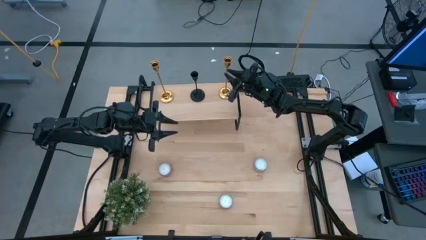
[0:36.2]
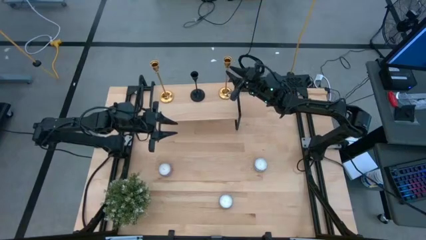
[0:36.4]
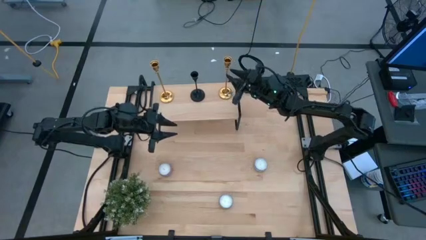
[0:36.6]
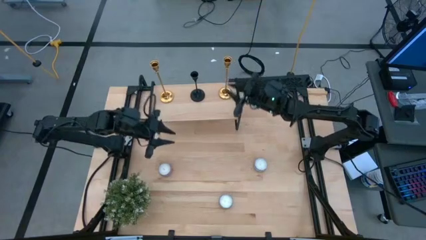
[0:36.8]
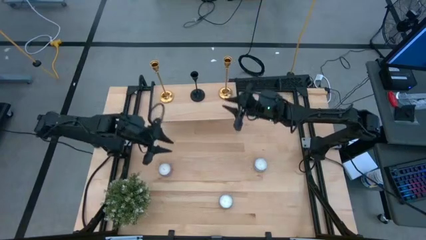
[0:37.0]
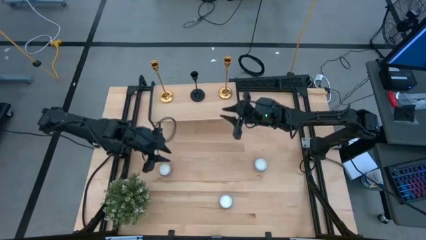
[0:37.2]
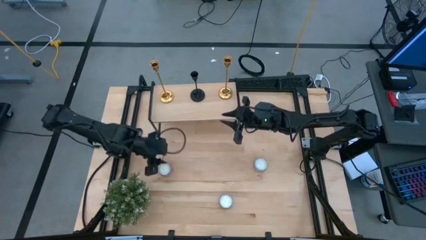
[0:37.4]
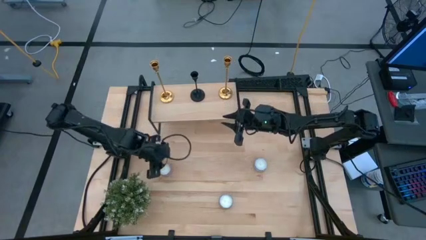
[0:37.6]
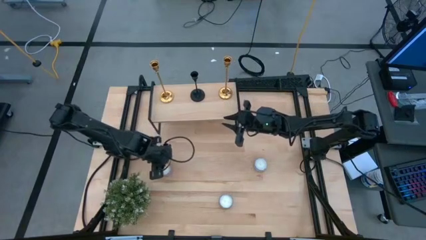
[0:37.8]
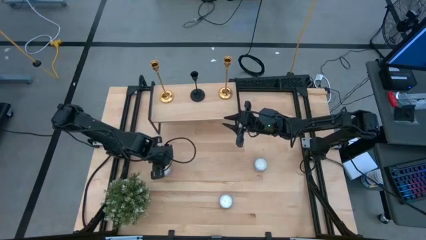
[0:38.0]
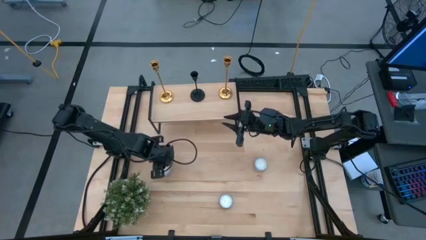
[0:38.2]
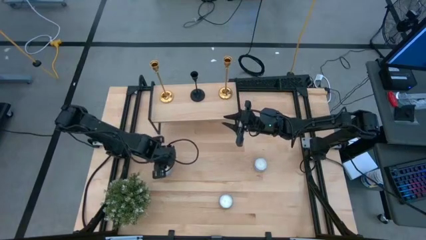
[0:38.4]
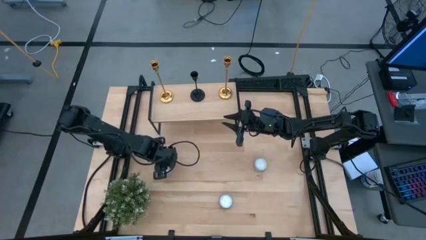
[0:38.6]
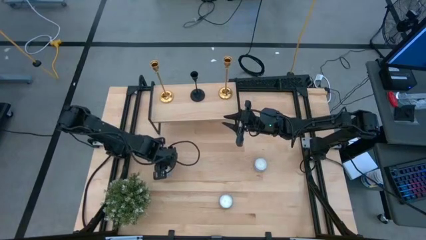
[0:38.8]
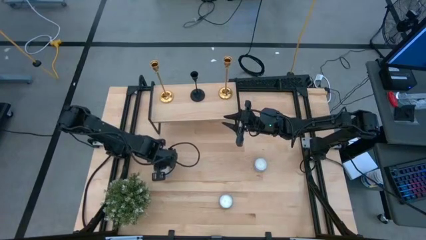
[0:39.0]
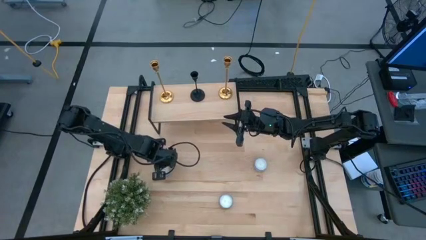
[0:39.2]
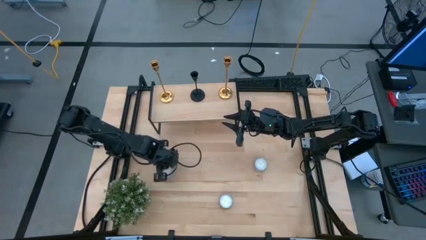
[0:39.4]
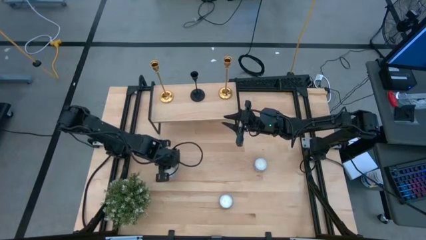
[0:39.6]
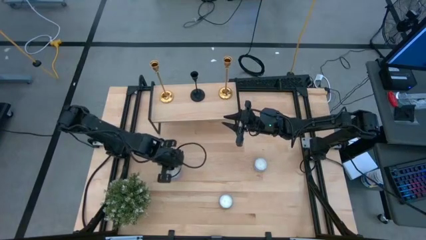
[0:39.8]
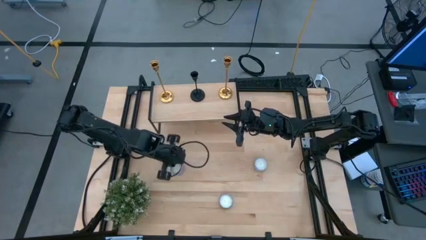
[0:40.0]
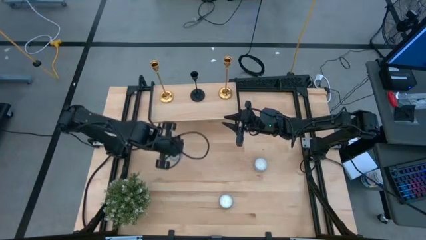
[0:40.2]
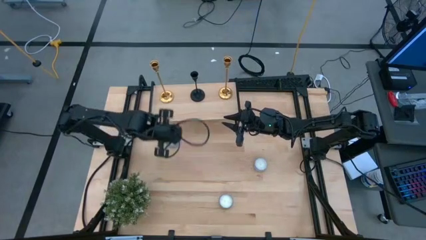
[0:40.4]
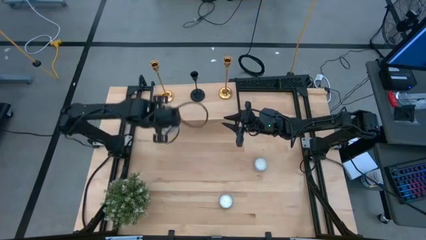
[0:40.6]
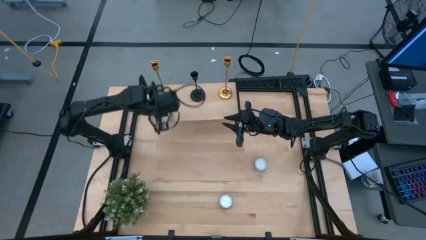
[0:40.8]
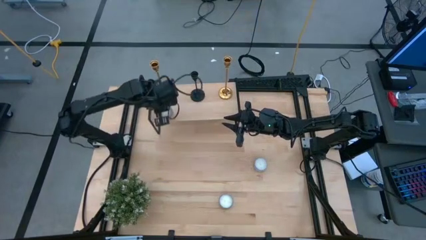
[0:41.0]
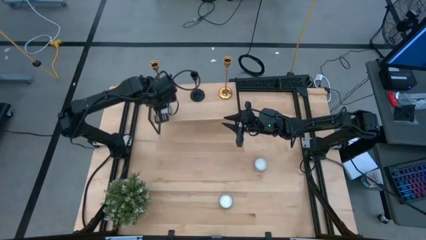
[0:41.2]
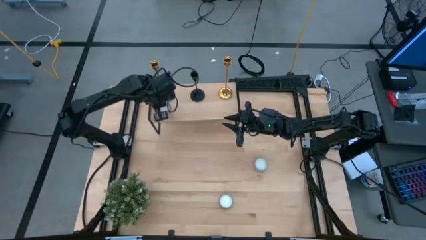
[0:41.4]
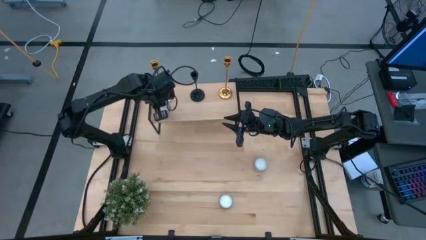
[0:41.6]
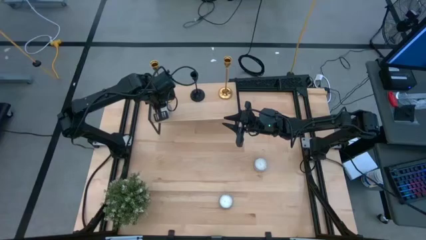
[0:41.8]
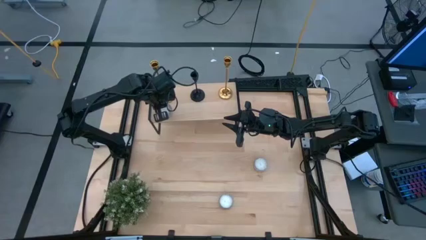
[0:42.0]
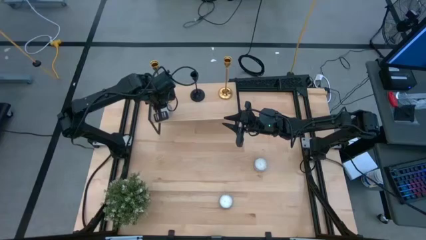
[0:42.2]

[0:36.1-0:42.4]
Task: Pick & Place candle stick holders
Put the purple candle on the shelf

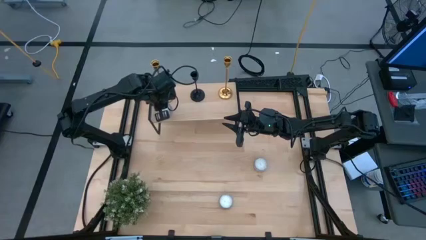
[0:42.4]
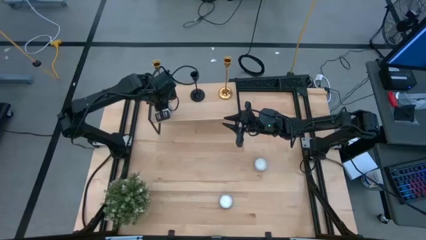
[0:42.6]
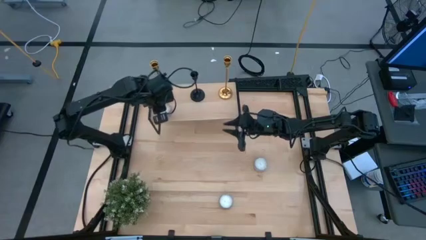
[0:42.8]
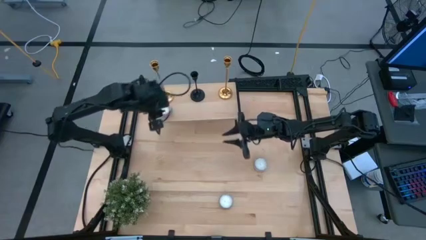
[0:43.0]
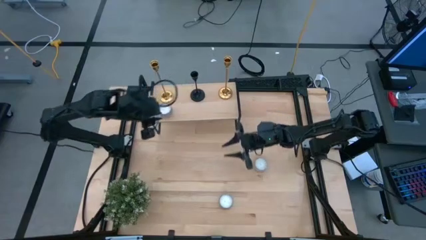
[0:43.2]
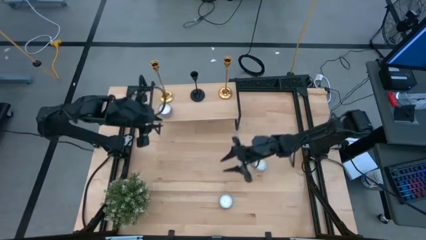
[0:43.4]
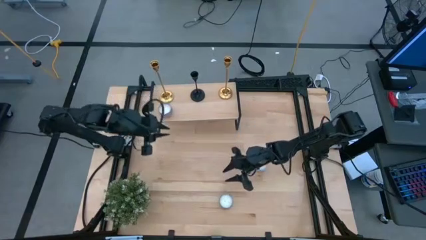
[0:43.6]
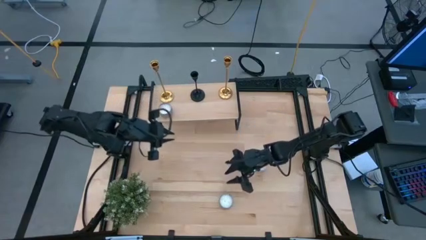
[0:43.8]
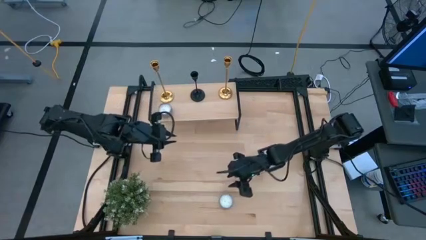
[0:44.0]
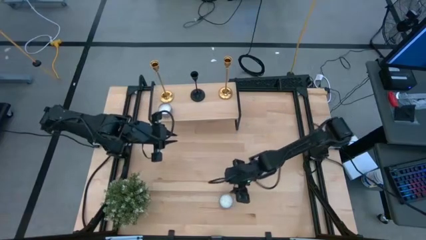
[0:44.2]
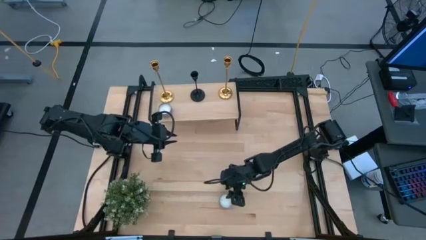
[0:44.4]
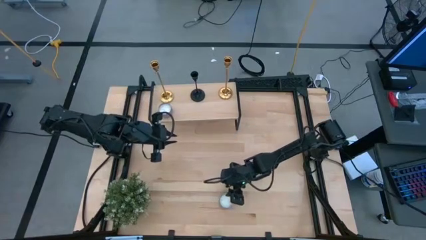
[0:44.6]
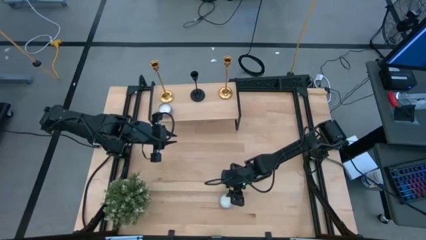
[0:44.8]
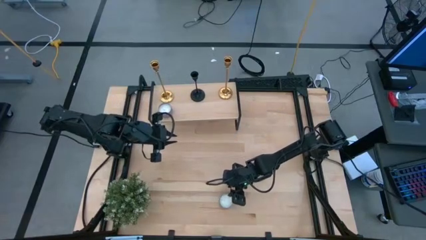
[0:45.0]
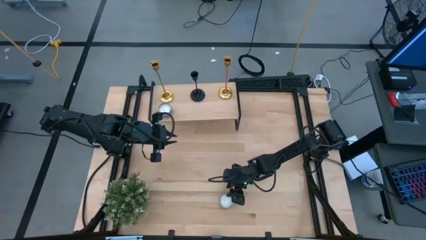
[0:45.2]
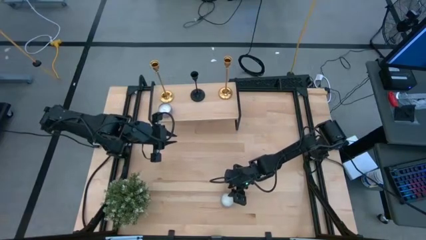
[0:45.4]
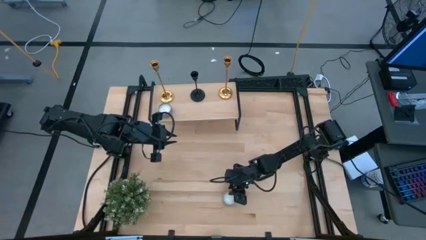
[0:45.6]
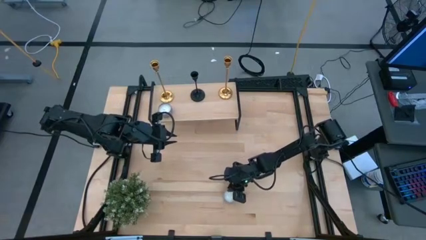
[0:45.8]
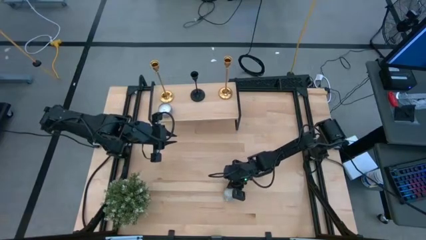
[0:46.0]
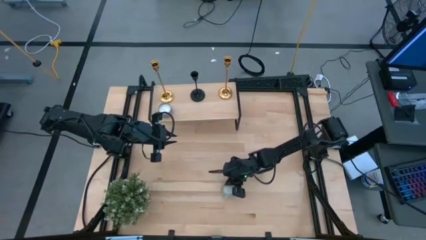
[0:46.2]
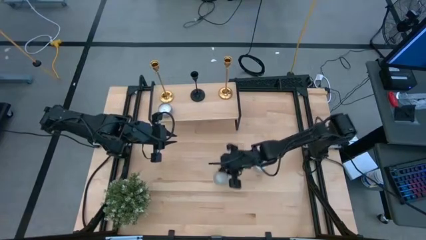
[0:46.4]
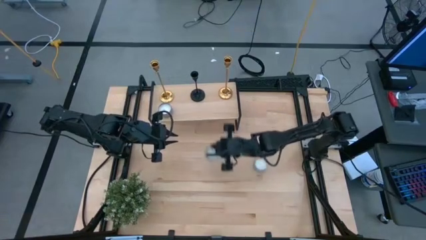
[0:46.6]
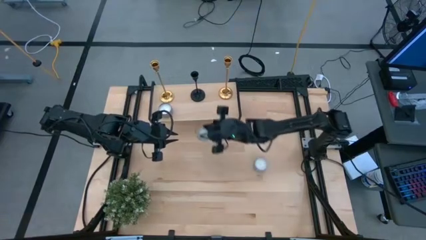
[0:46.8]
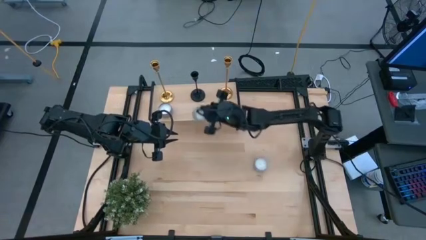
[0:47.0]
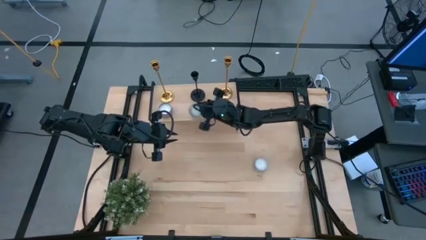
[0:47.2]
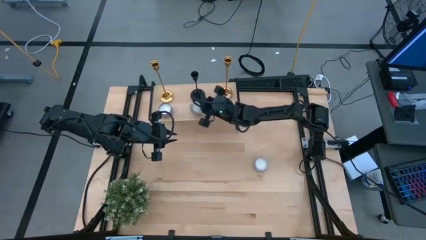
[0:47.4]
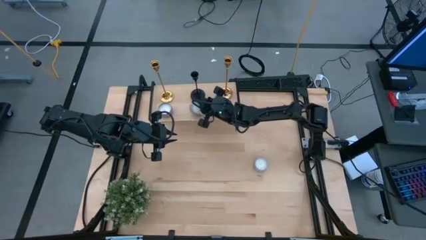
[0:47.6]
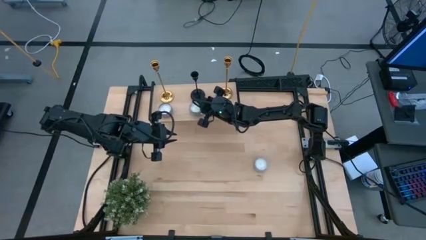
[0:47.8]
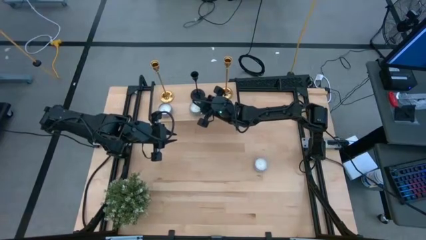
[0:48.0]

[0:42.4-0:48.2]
Put the blue candle on the shelf aligned with the other candle

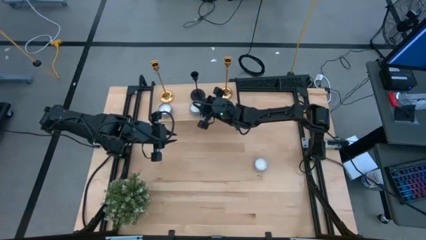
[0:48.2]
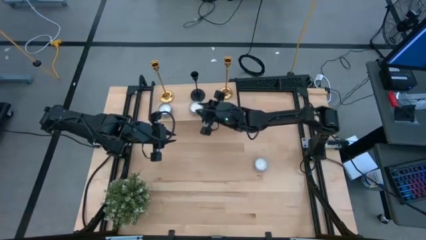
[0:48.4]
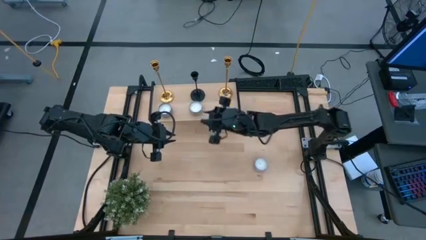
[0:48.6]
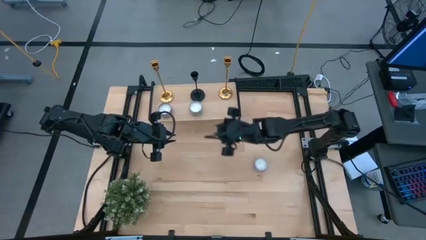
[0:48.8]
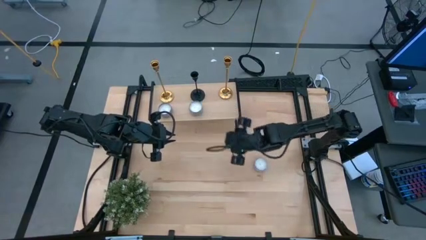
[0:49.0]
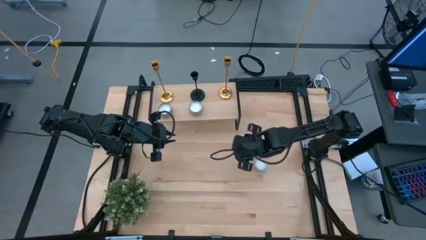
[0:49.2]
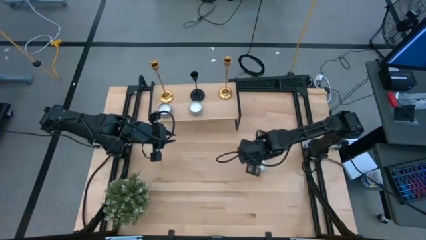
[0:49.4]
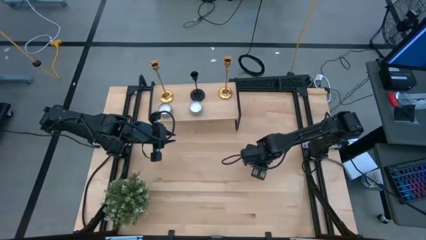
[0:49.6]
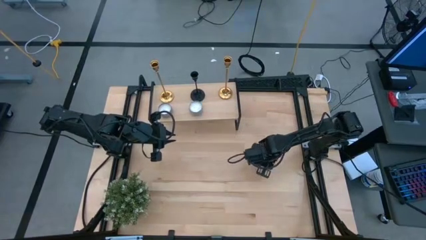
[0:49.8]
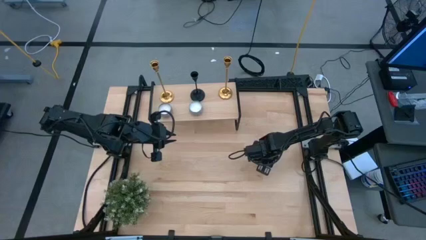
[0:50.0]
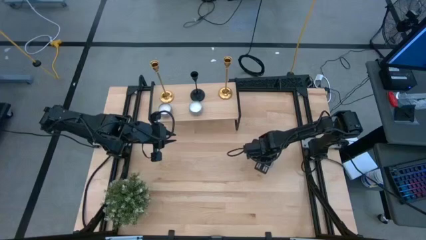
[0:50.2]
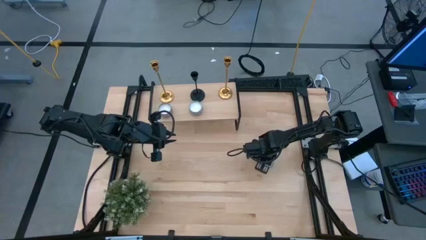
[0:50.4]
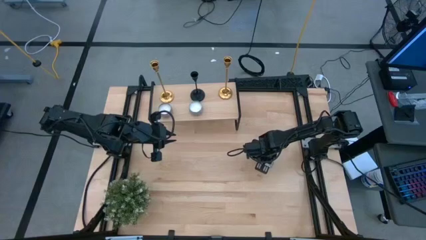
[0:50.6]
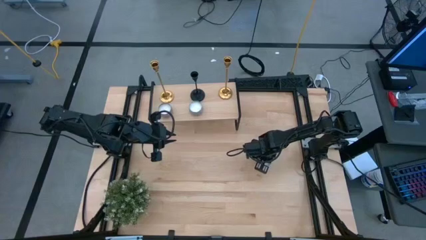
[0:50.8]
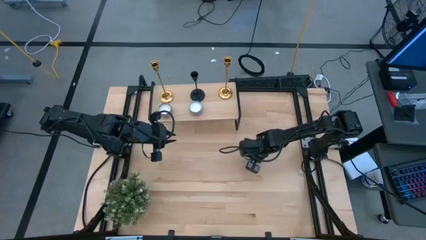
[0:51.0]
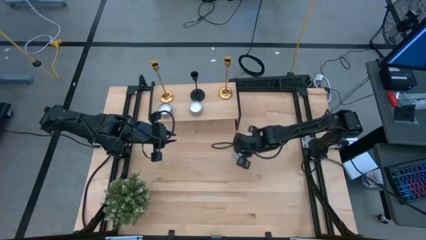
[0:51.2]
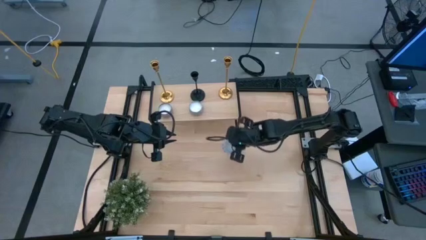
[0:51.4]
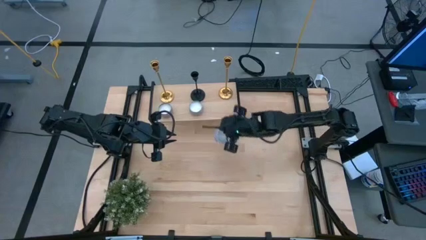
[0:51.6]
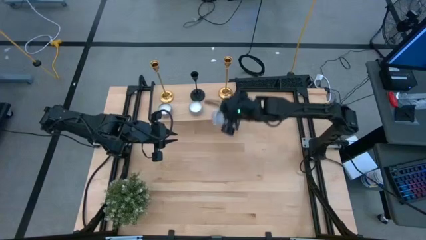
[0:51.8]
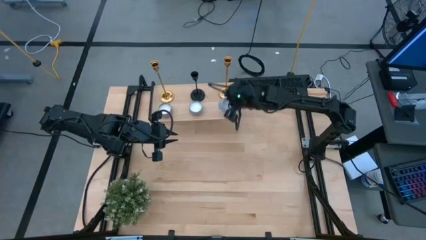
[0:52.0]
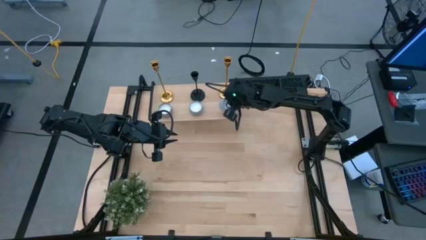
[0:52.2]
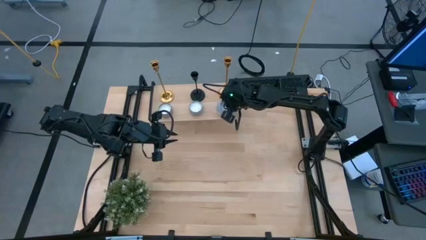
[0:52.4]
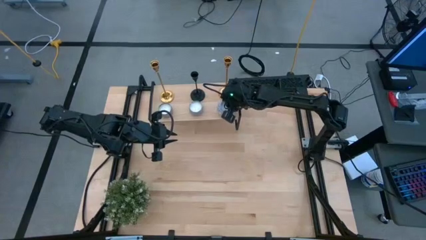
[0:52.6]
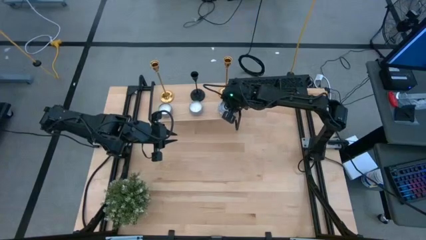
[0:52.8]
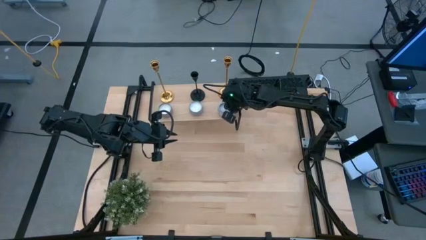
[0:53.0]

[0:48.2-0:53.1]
Put the red candle on the shelf aligned with the other candles
